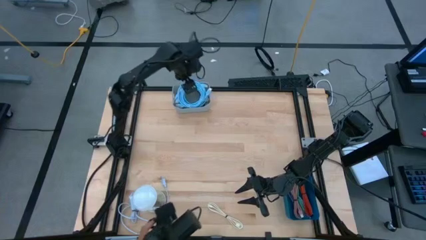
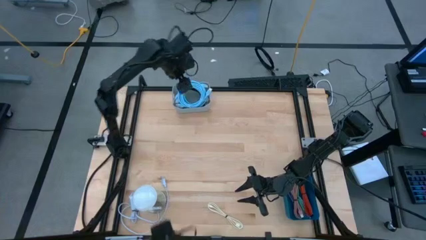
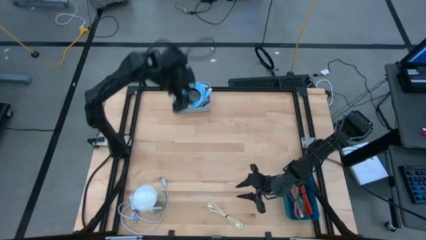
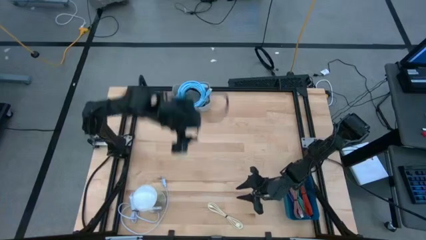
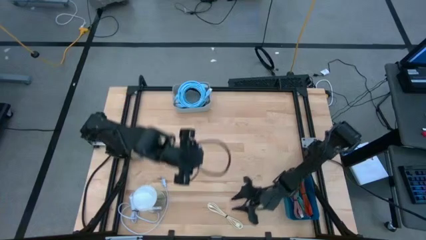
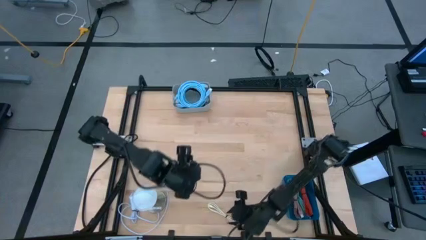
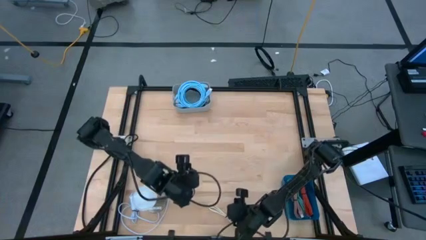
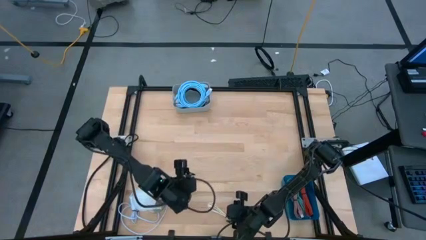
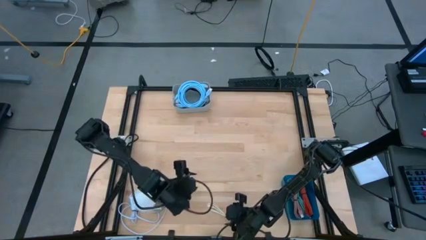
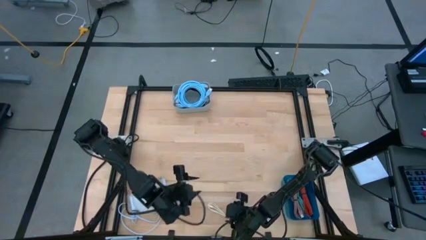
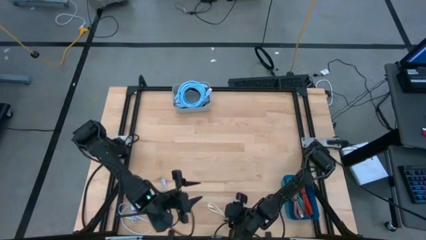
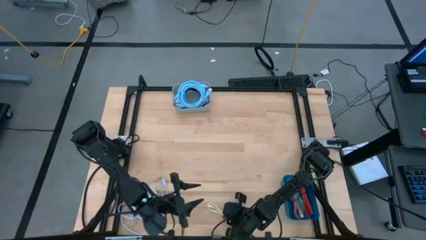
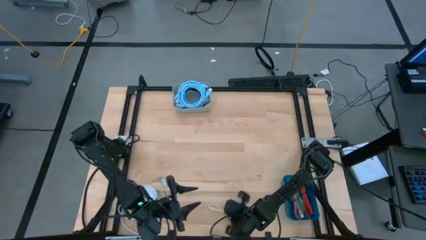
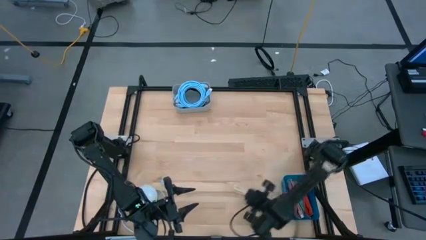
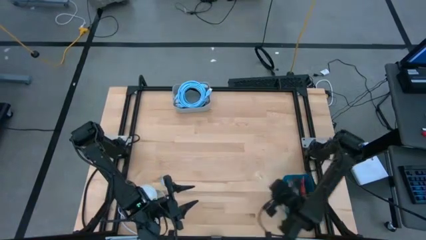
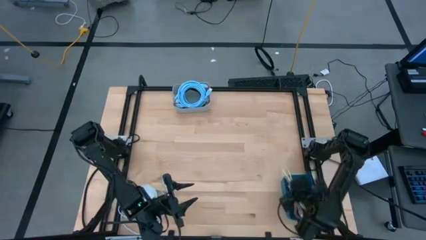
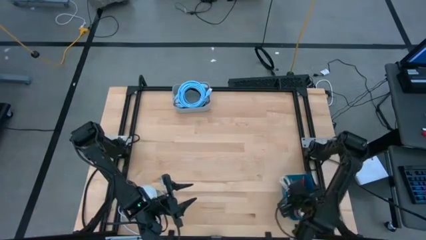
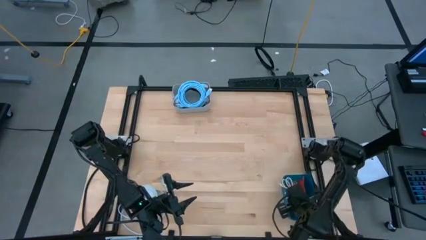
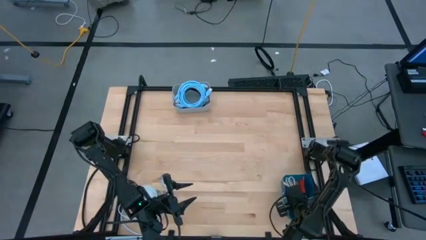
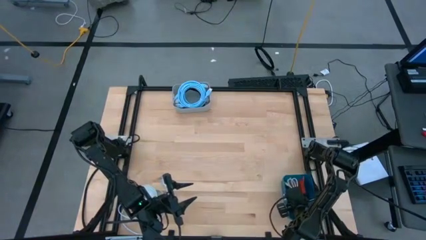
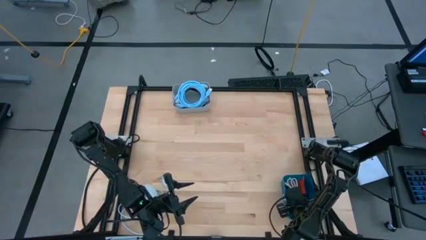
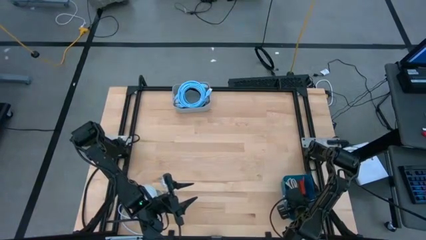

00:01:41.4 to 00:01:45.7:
Task: Pick & Place USB Port
Put the white USB cable into the blue bin

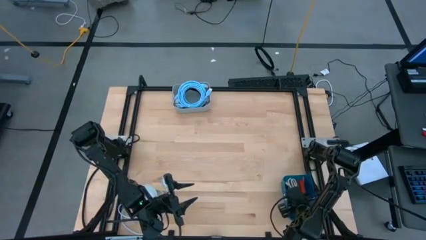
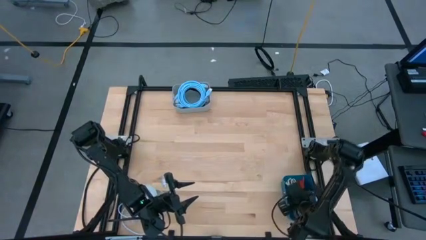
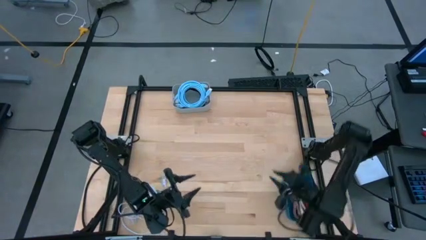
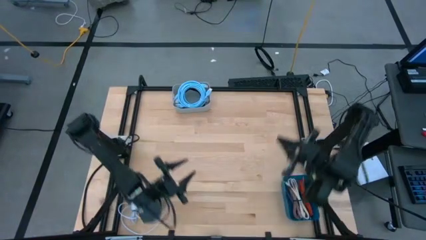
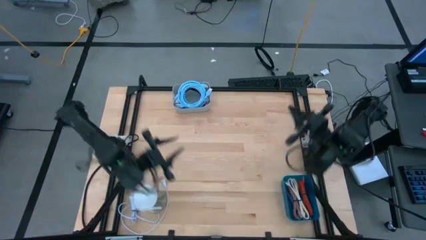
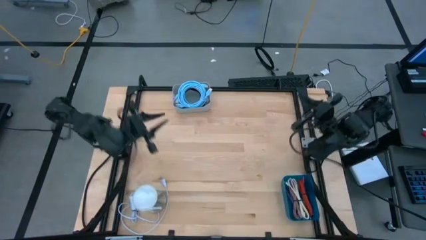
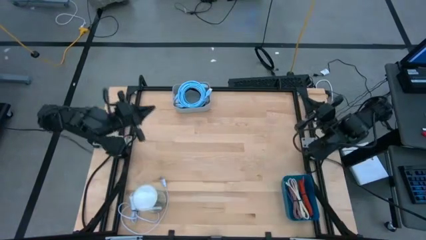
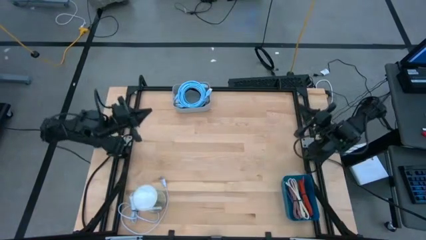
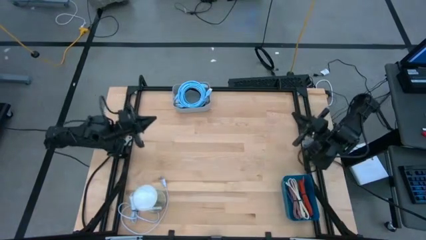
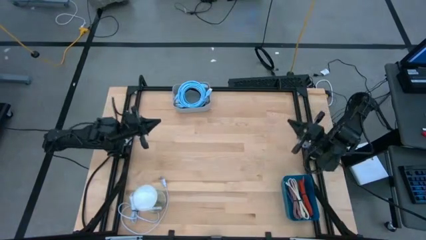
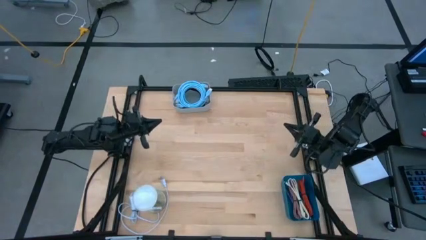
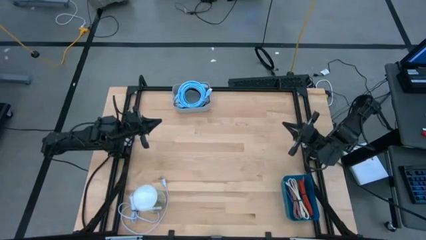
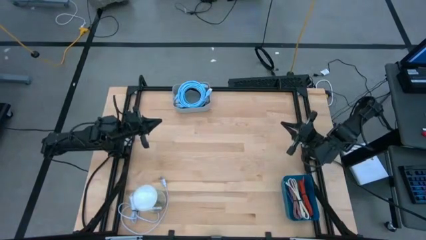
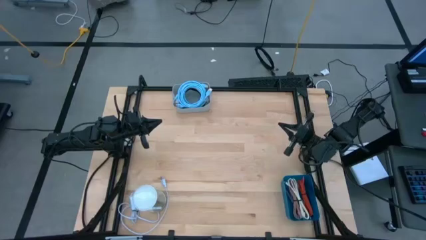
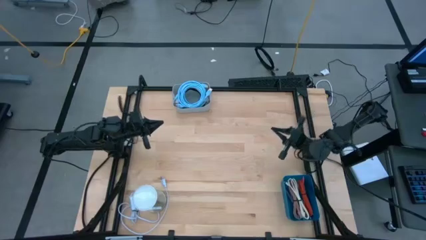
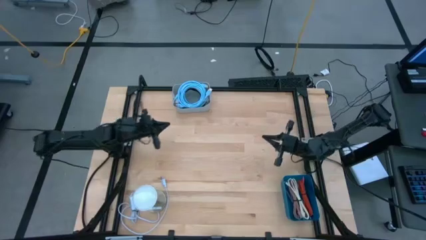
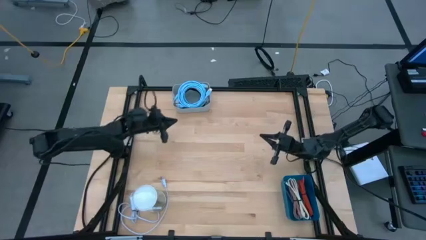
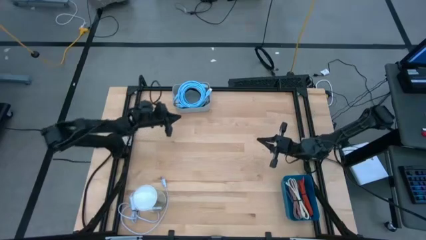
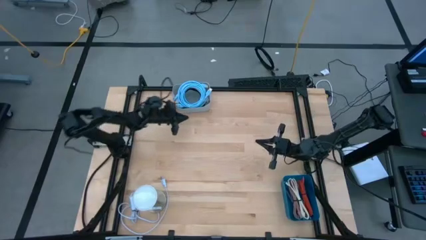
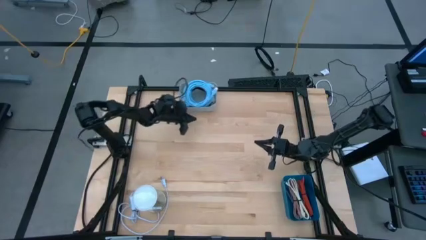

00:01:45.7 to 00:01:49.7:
Adjust the gray bin

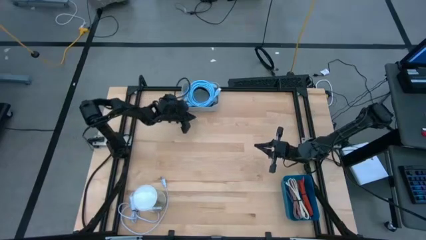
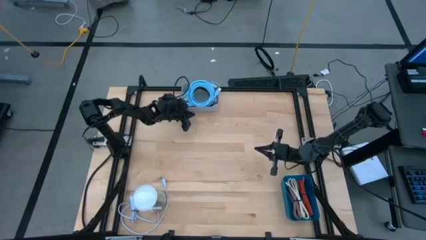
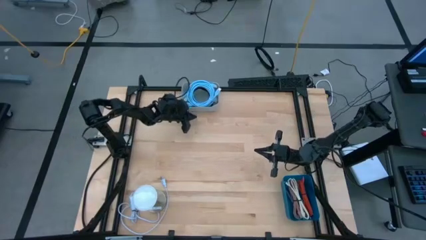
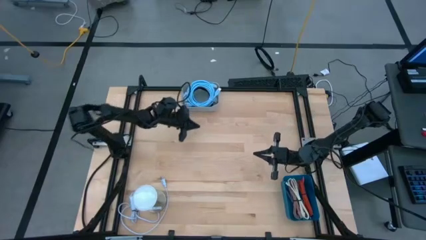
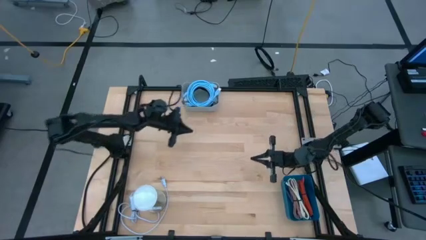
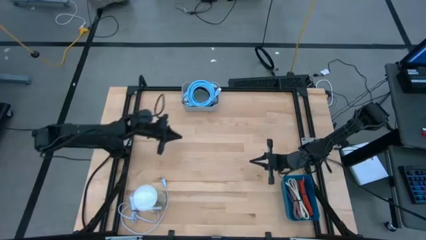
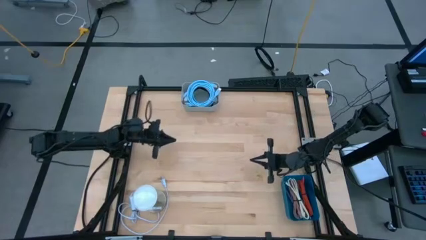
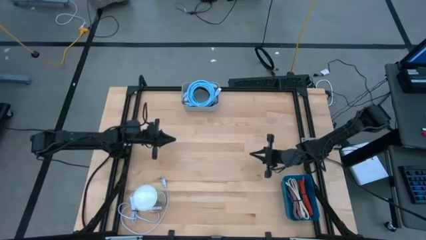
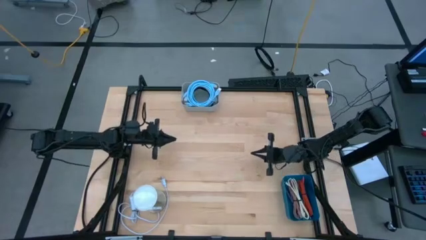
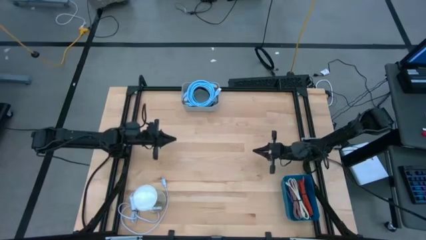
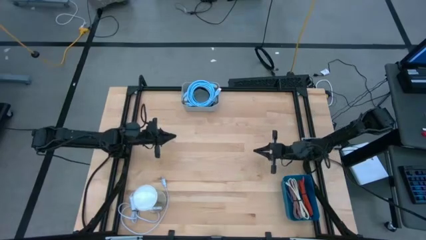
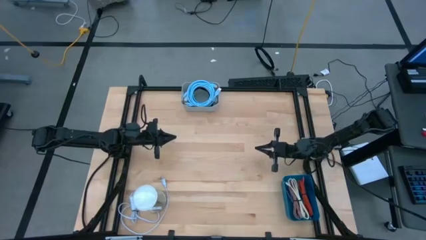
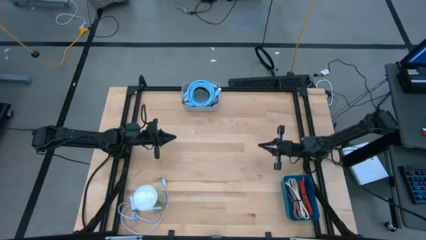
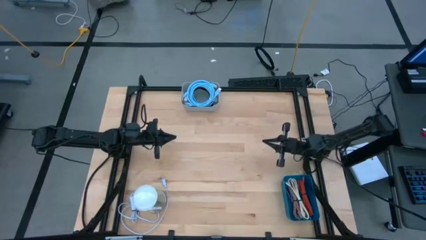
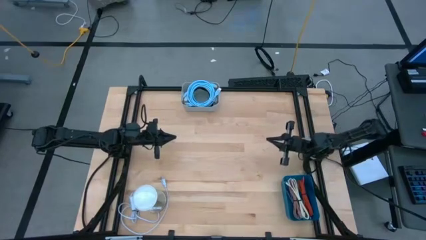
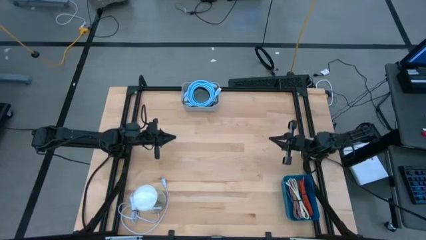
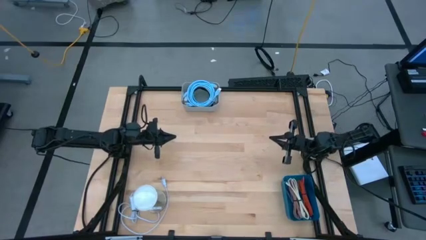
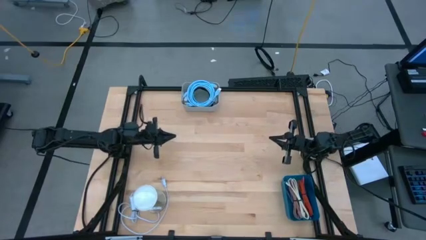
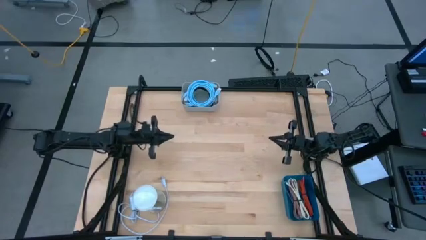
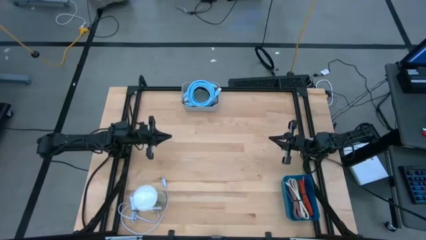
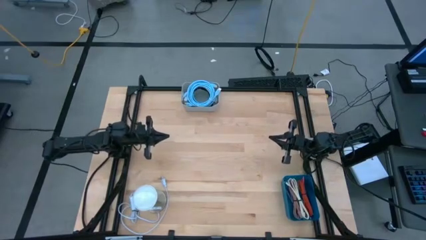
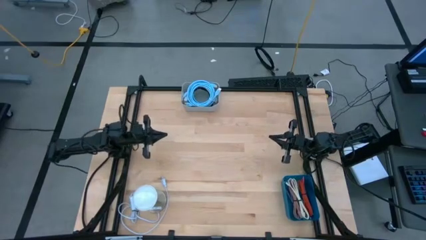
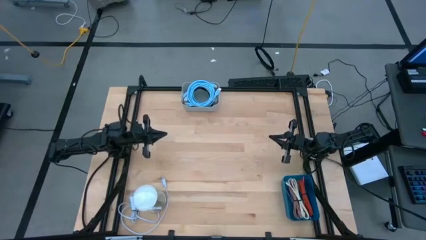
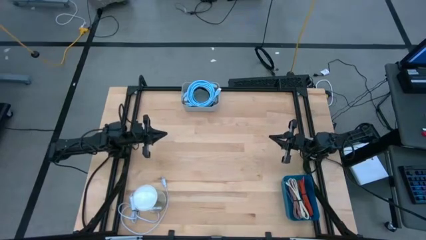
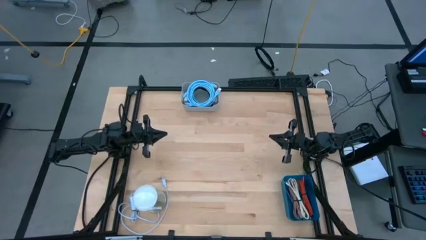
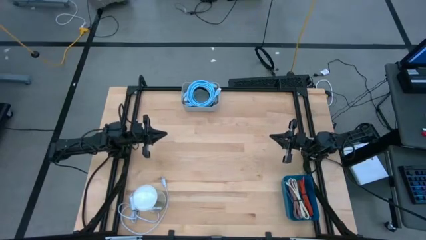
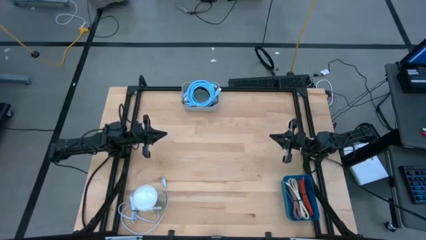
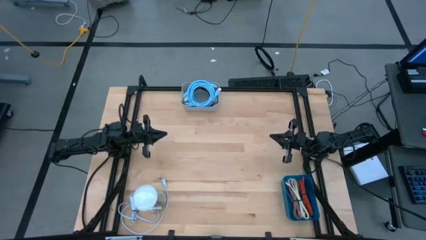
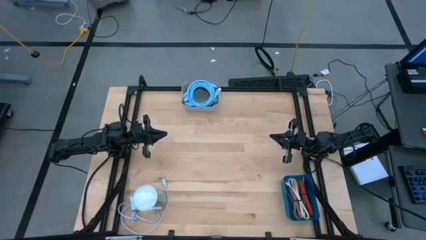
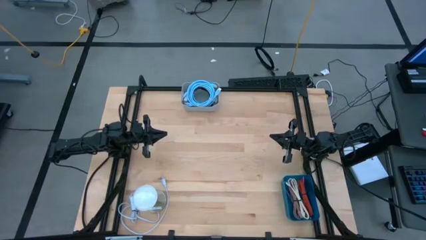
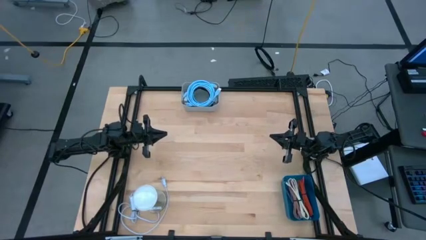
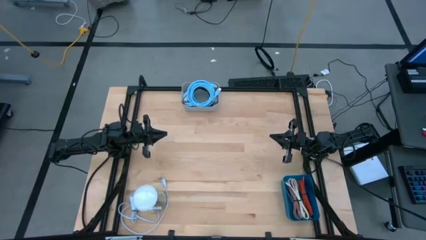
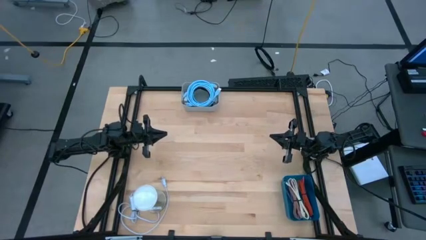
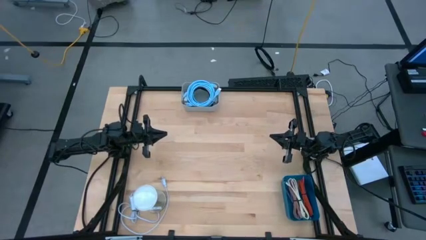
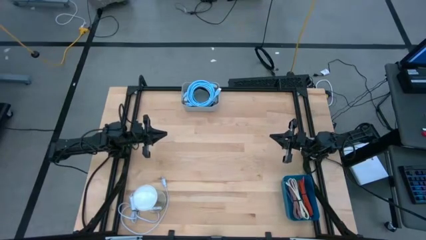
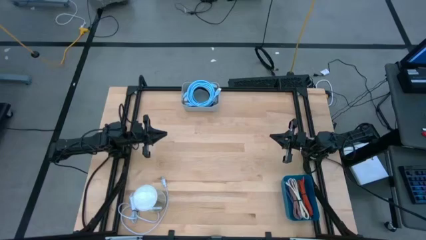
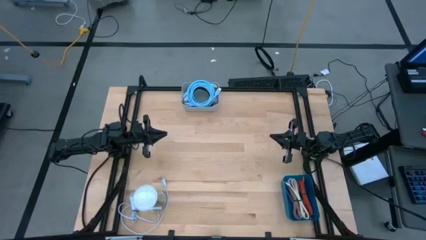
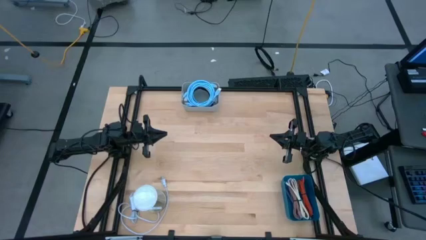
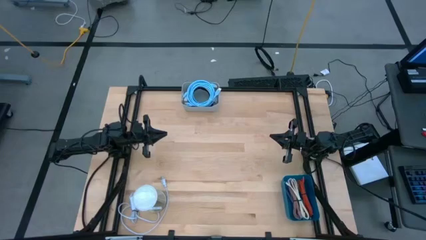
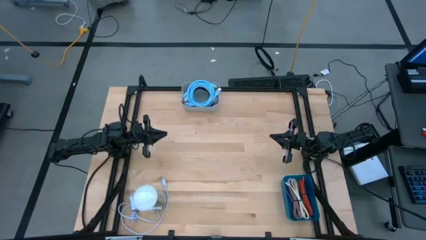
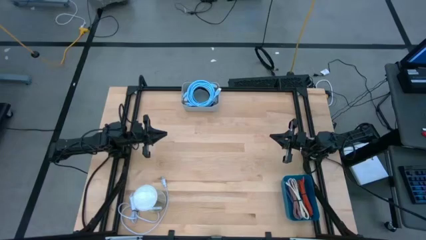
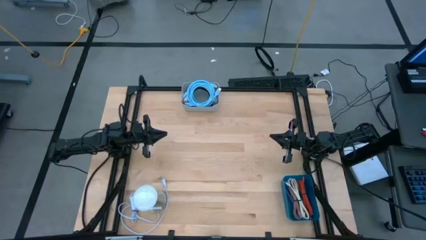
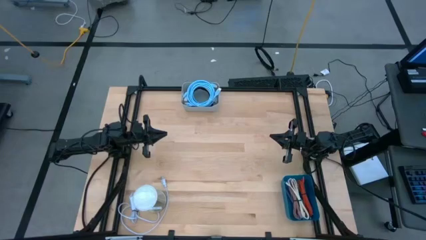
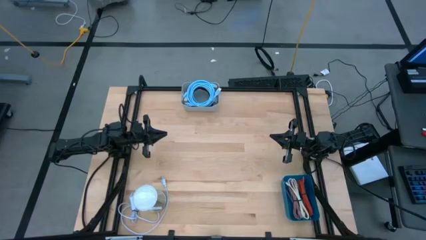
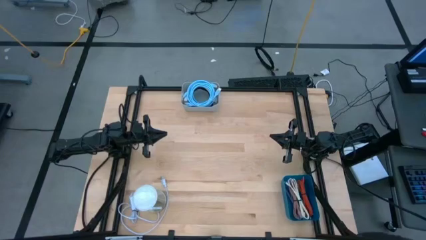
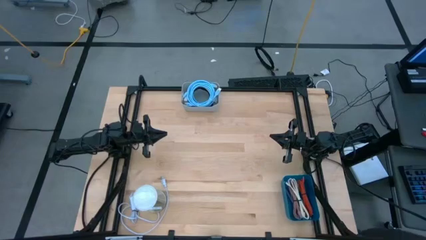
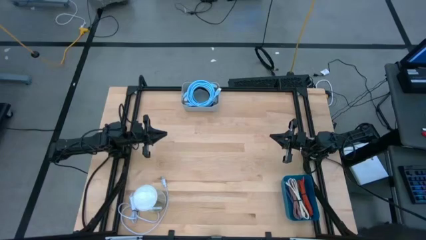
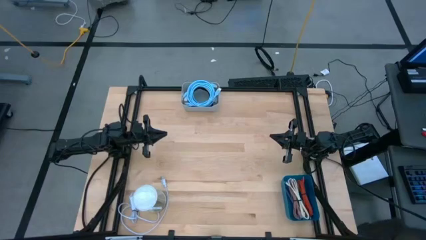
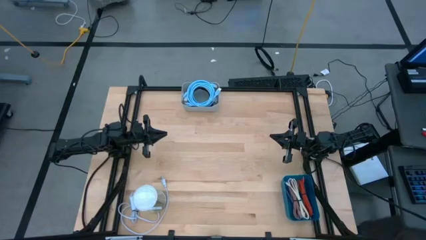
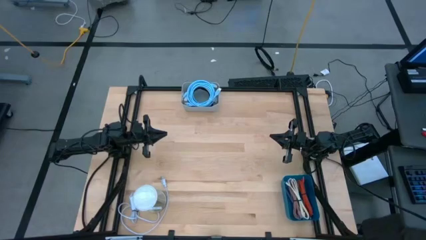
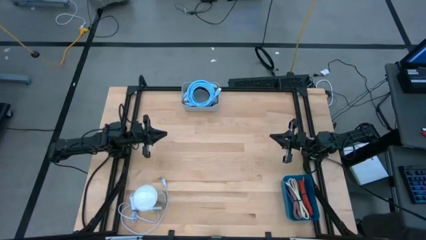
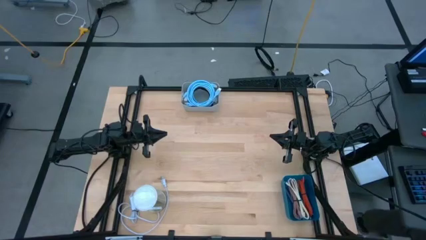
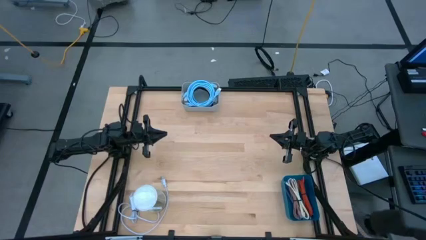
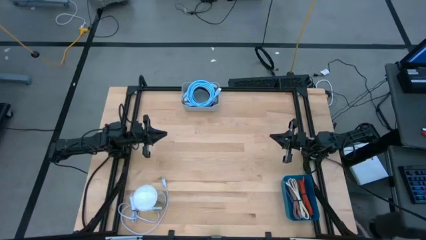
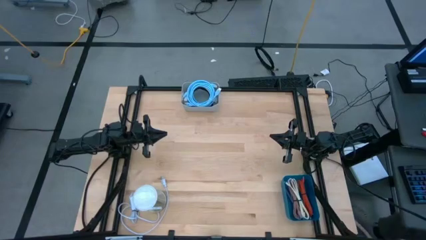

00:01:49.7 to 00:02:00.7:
Return to Home Position
